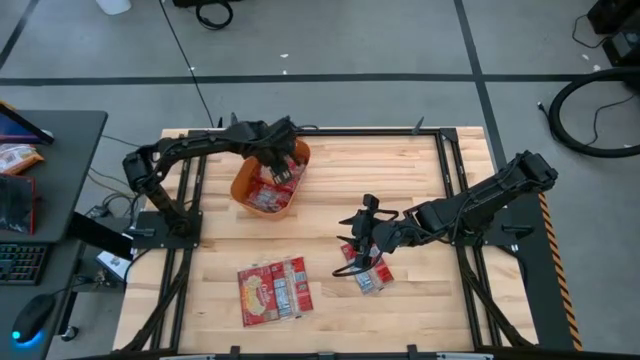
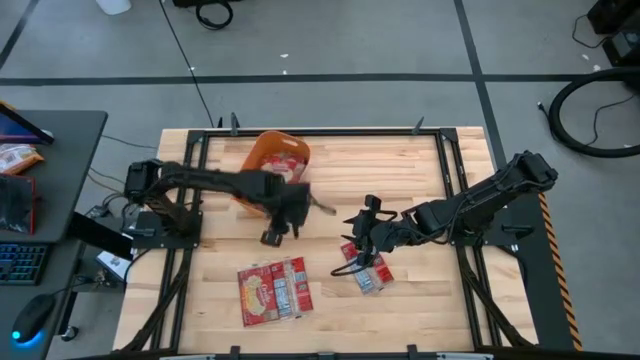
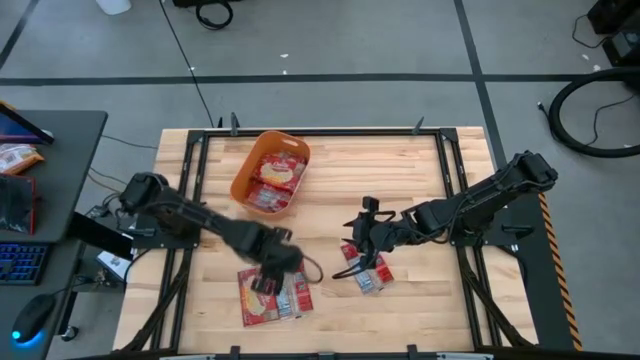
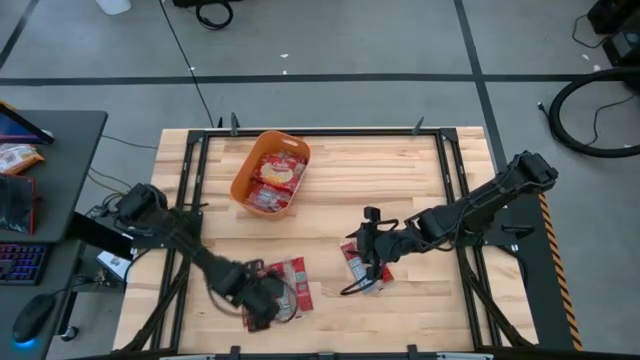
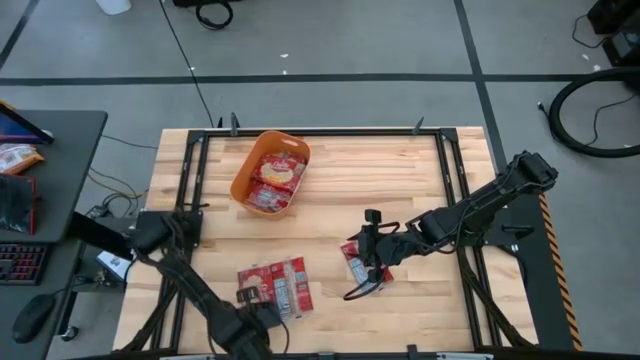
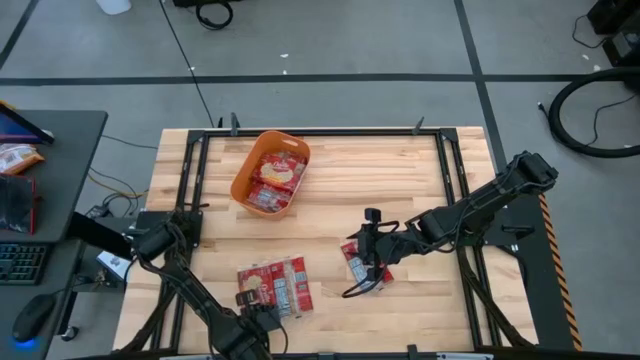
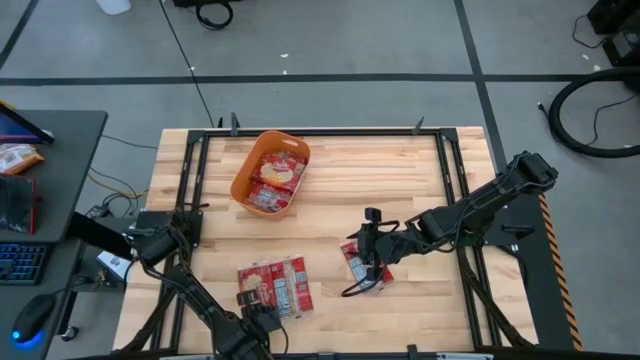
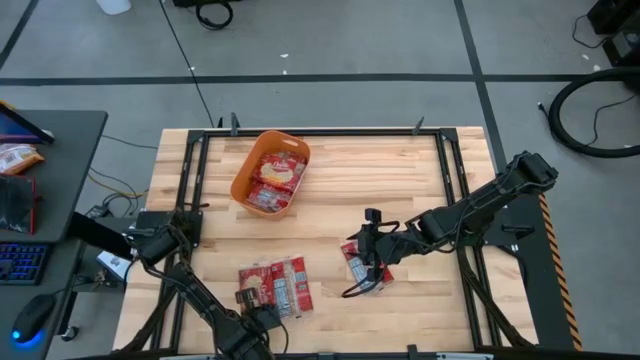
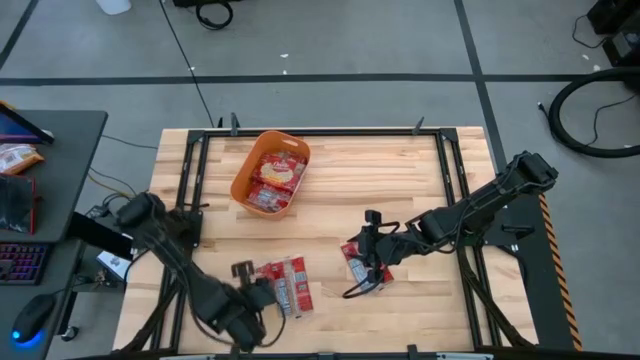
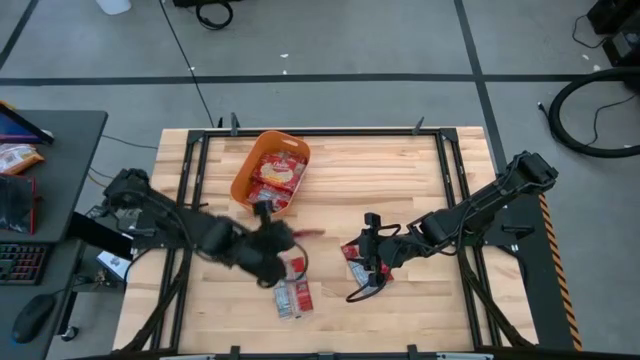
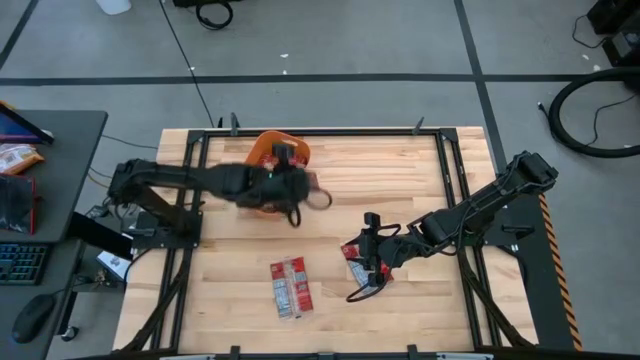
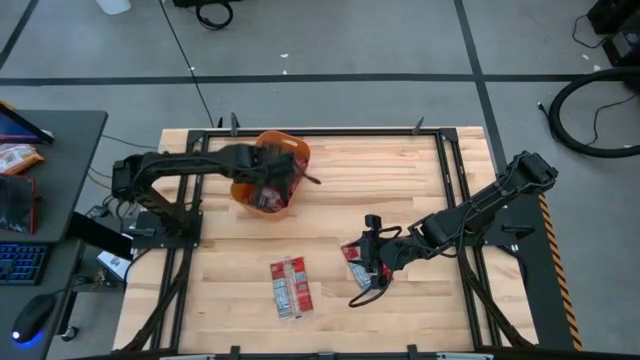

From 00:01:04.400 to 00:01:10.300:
Task: Sort popcorn bags into baskets
Stack the popcorn pack on top of the other popcorn into the orange bin

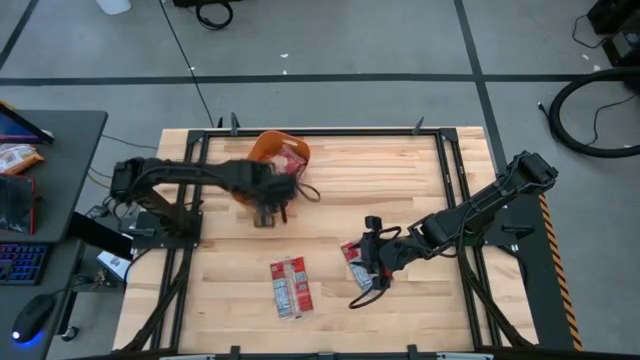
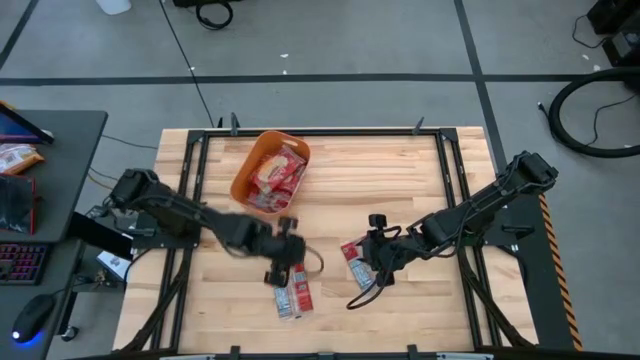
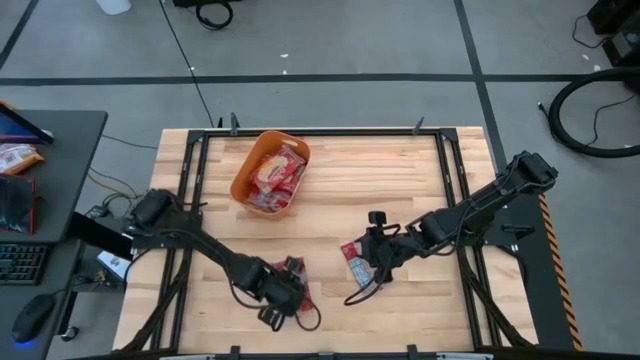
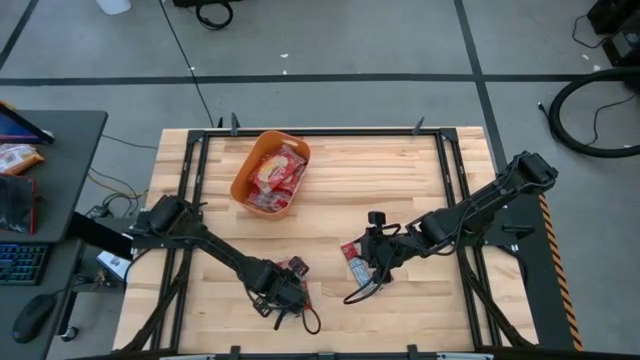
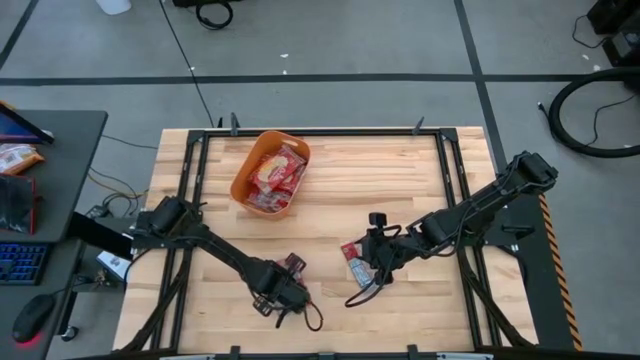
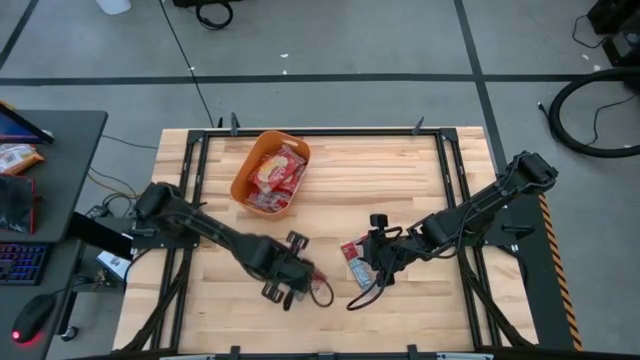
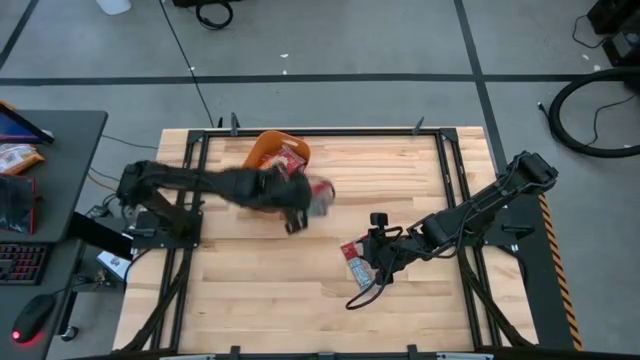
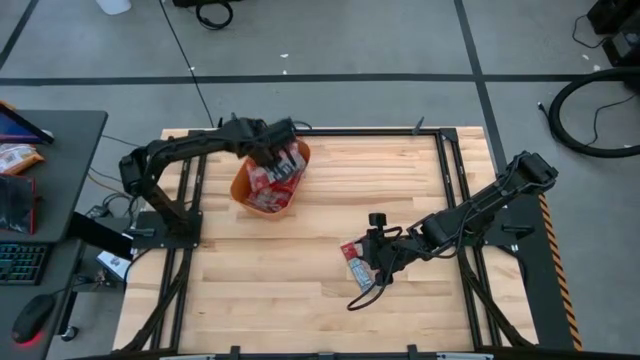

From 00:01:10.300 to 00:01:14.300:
Stack the popcorn pack on top of the other popcorn into the orange bin

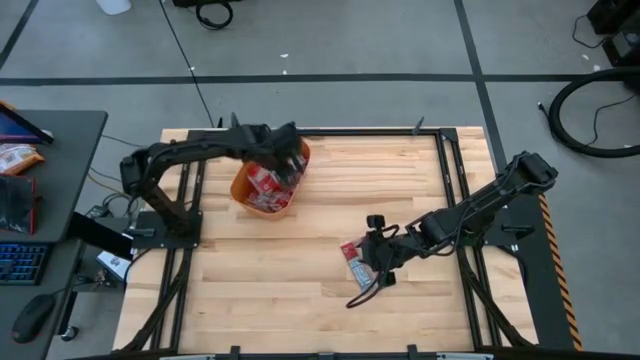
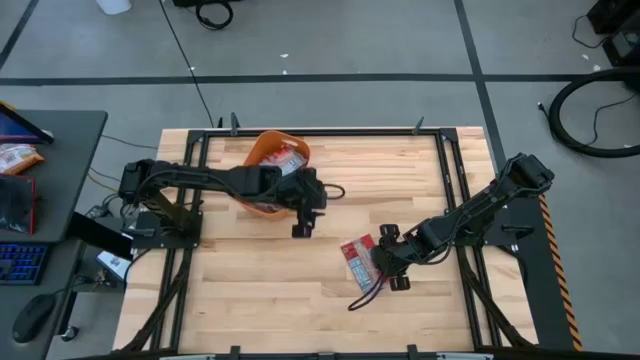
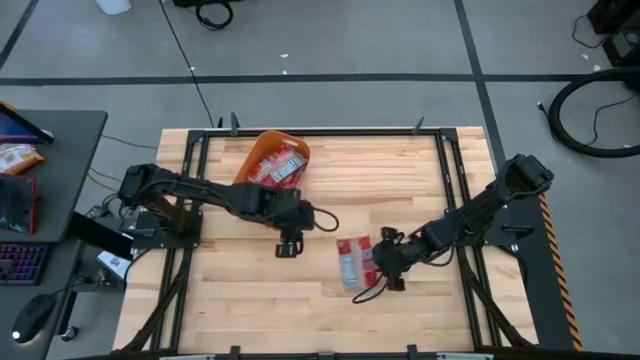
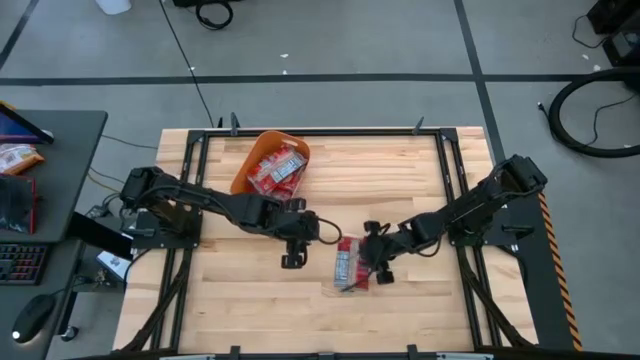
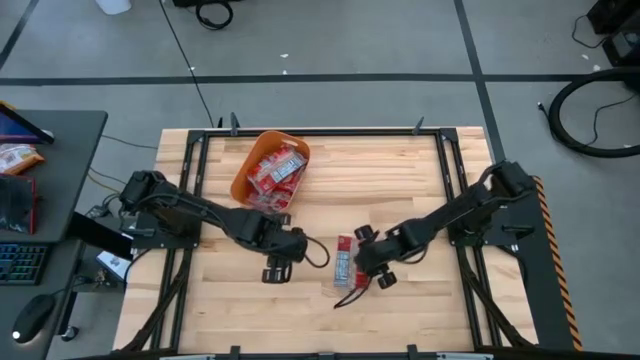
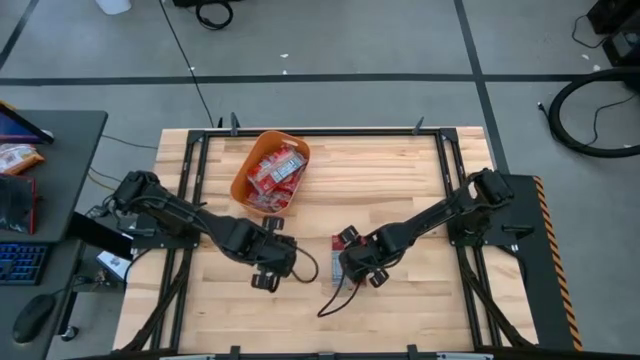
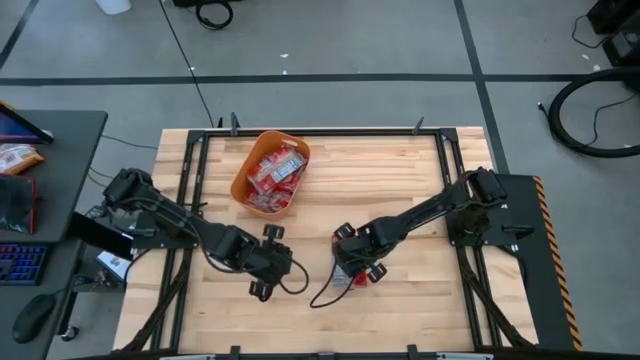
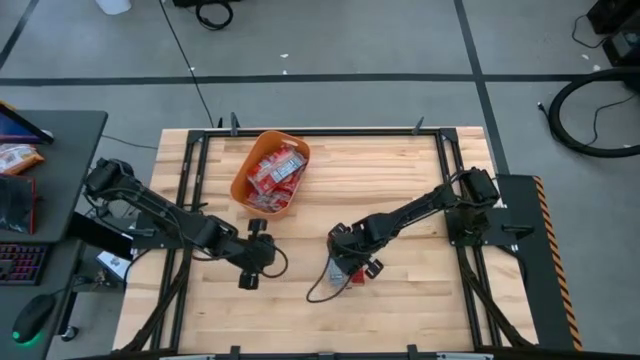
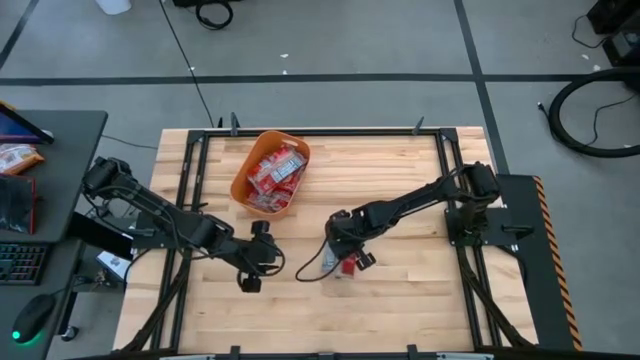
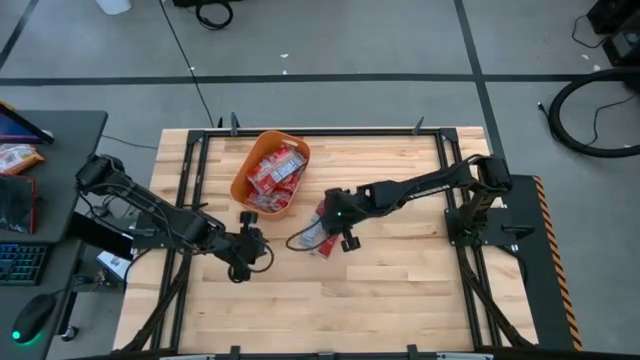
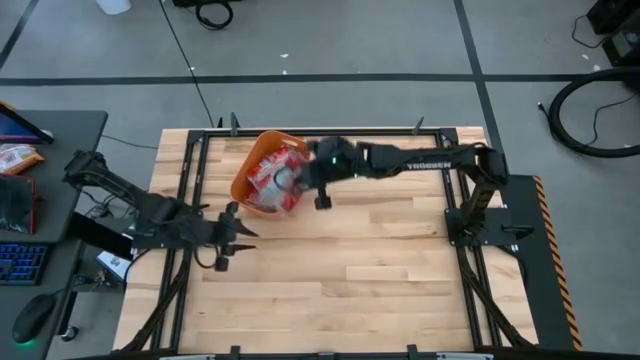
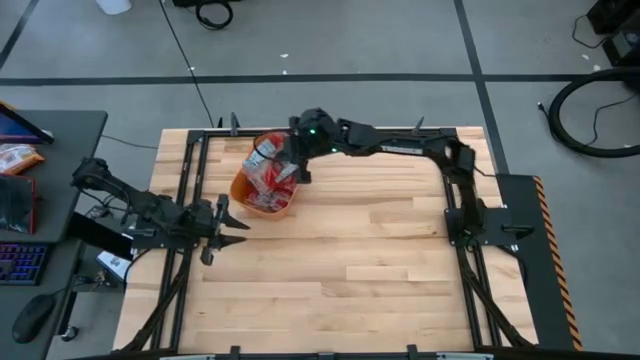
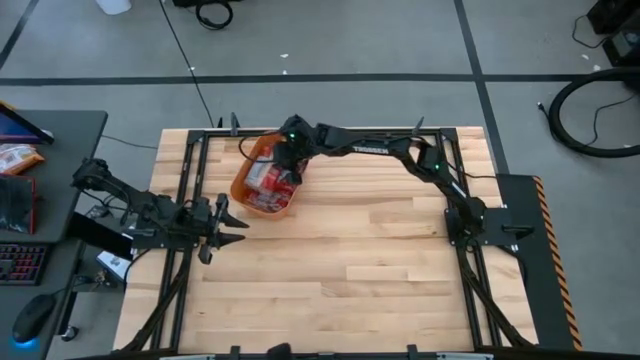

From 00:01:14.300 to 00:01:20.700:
Stack the popcorn pack on top of the other popcorn into the orange bin

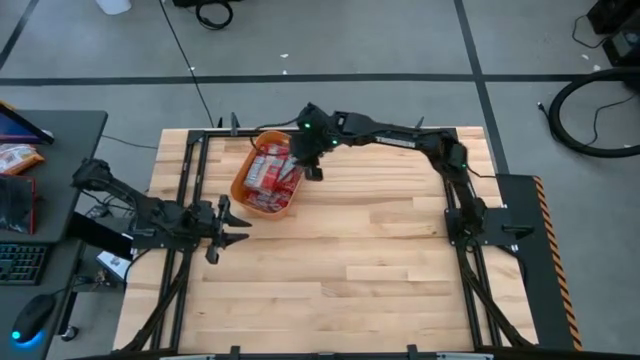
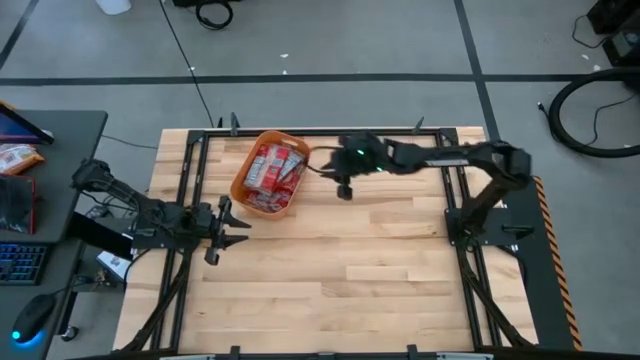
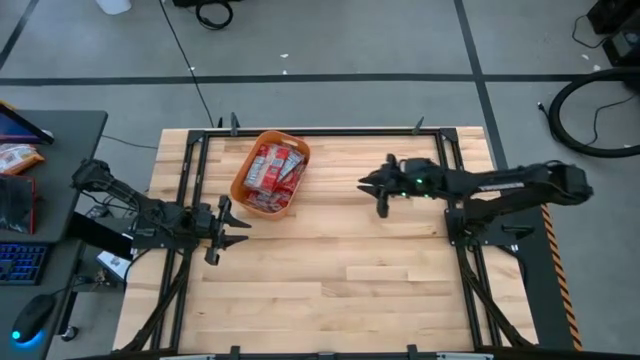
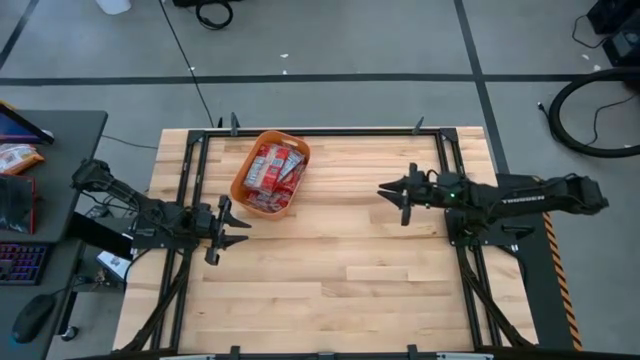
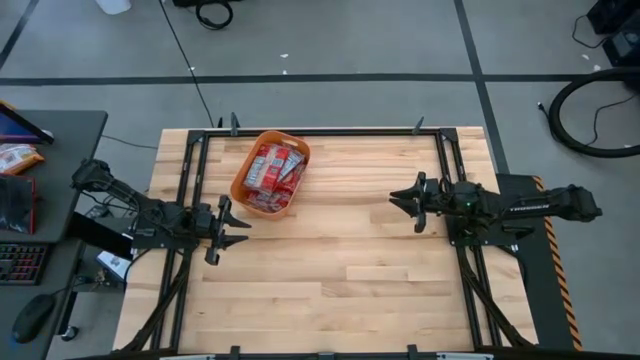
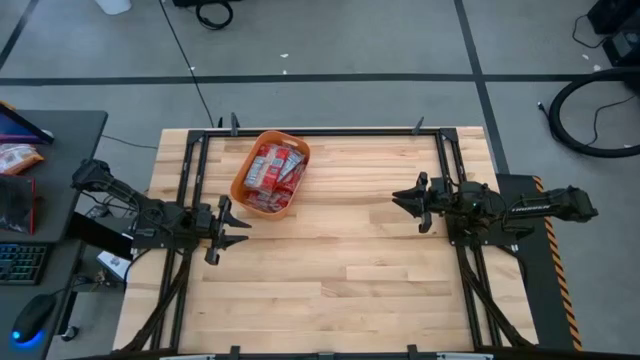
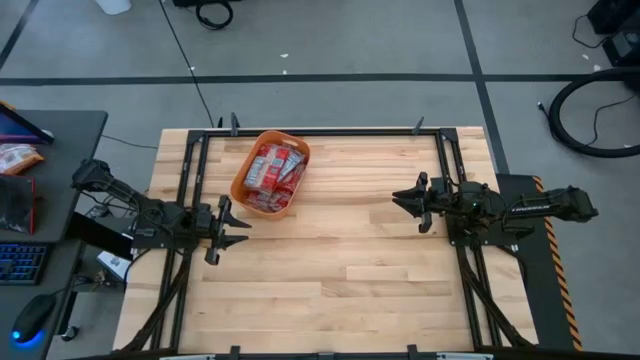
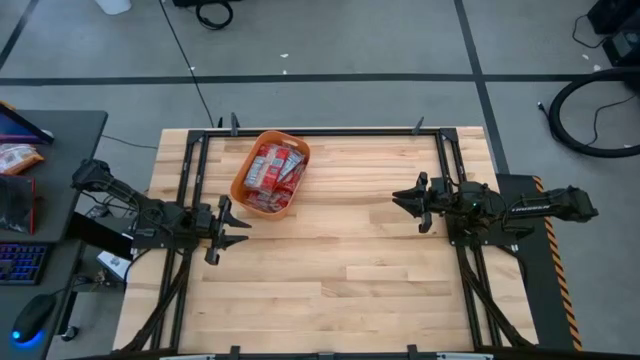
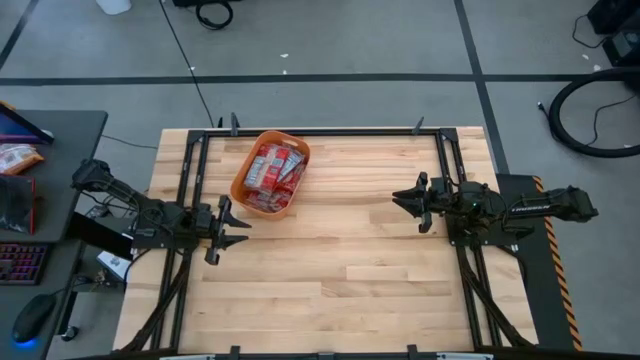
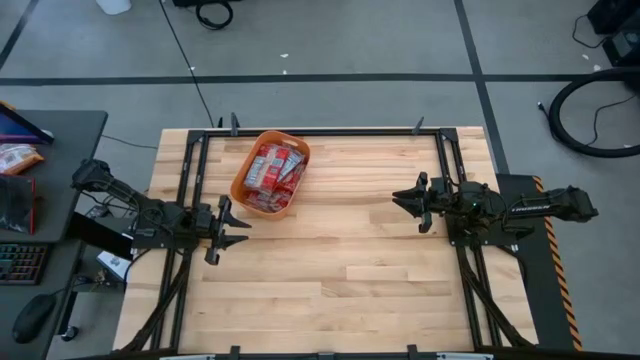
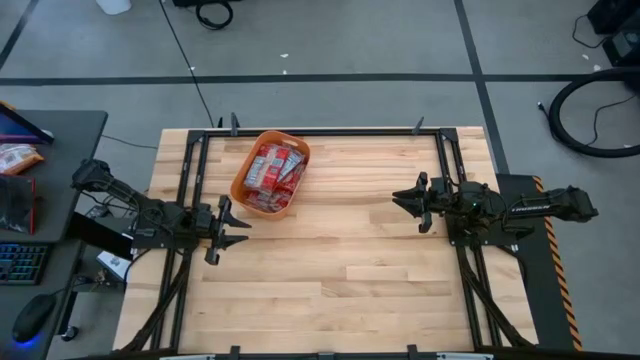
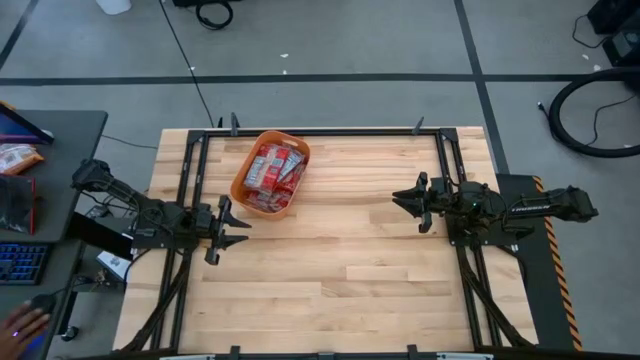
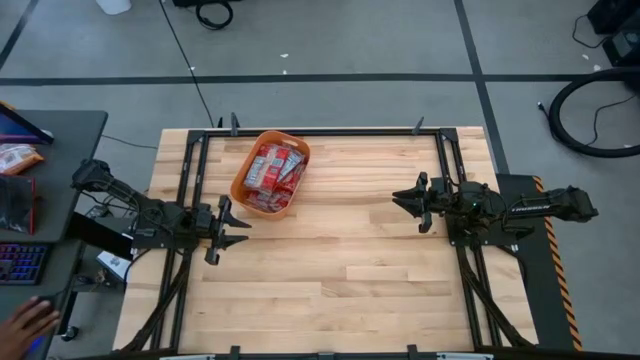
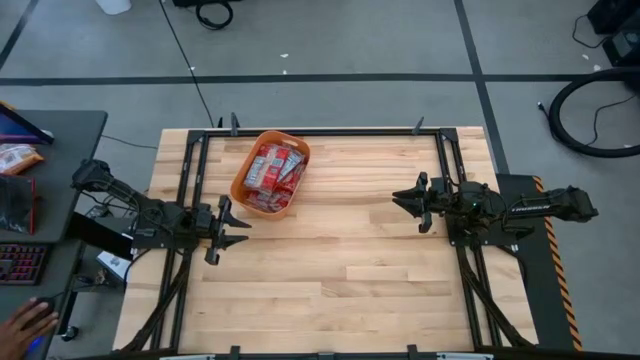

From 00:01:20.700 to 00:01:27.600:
Return to Home Position
